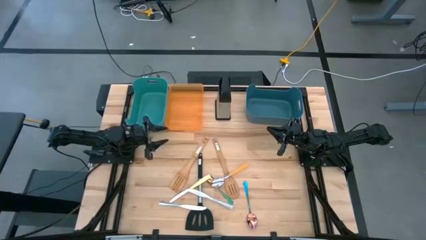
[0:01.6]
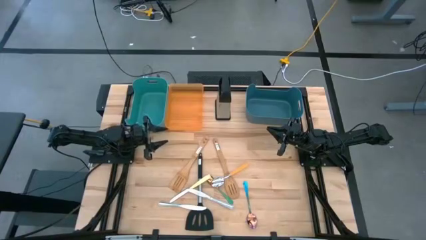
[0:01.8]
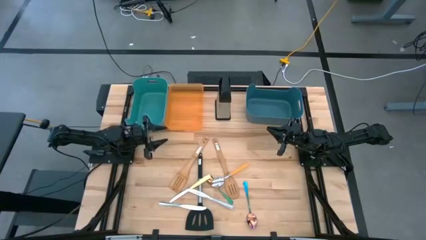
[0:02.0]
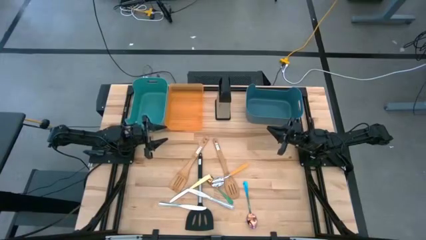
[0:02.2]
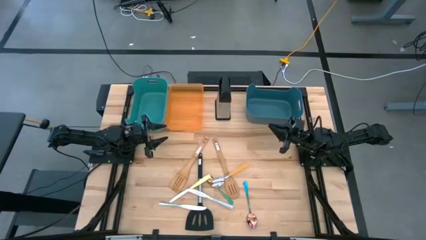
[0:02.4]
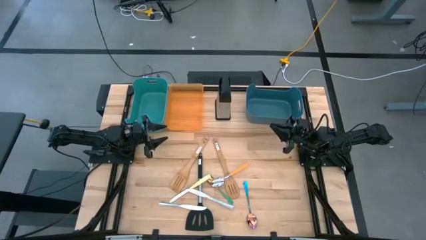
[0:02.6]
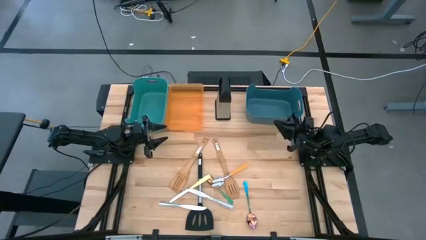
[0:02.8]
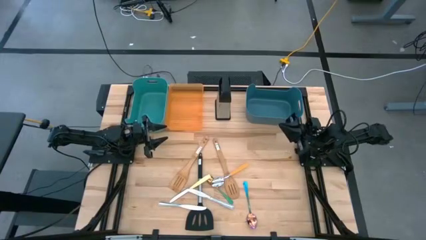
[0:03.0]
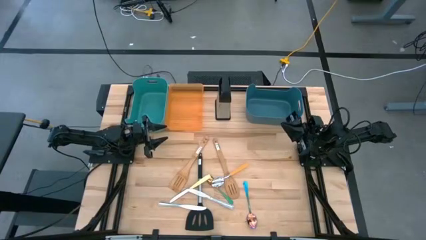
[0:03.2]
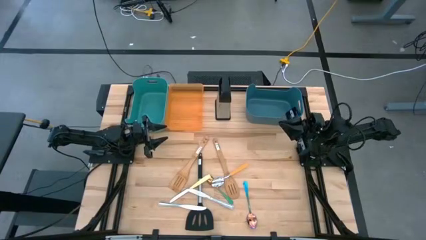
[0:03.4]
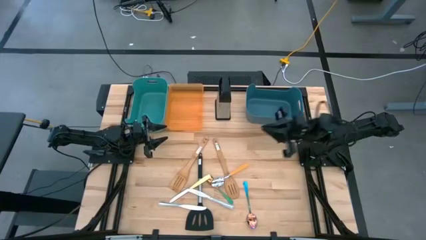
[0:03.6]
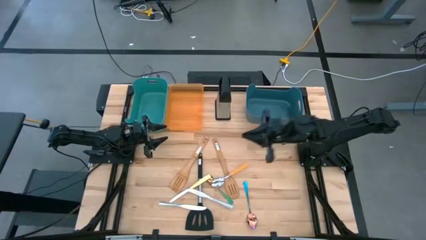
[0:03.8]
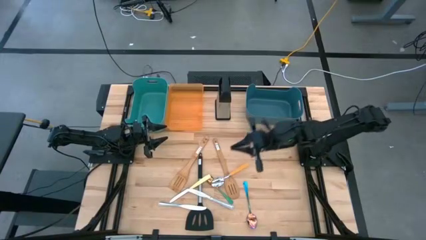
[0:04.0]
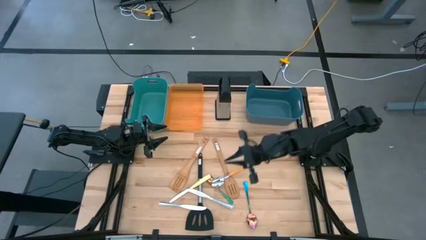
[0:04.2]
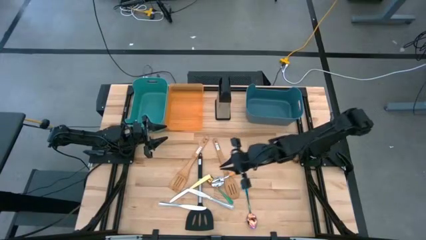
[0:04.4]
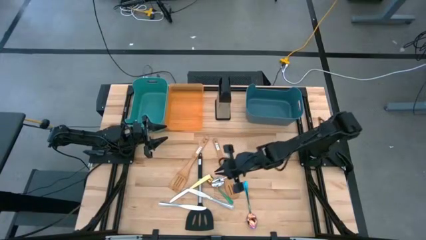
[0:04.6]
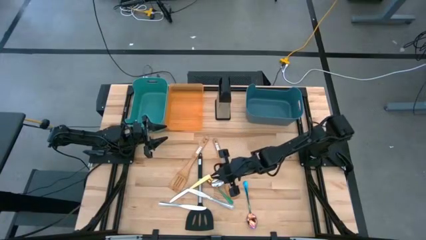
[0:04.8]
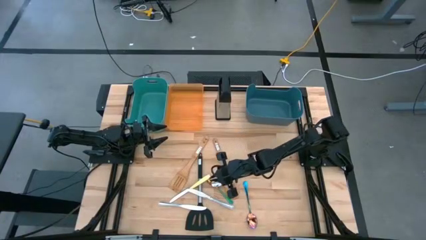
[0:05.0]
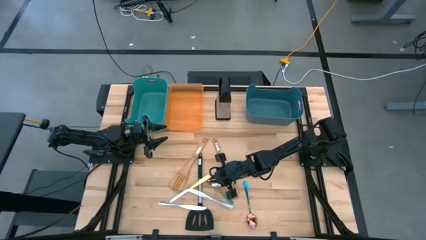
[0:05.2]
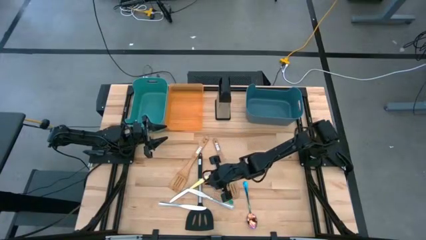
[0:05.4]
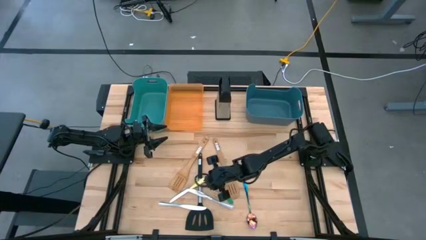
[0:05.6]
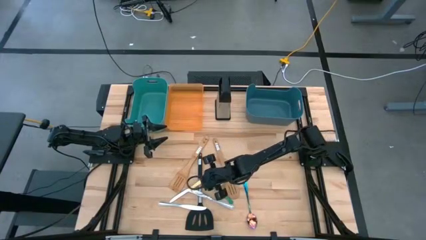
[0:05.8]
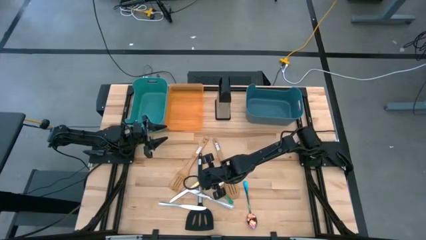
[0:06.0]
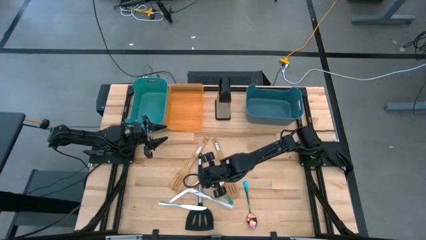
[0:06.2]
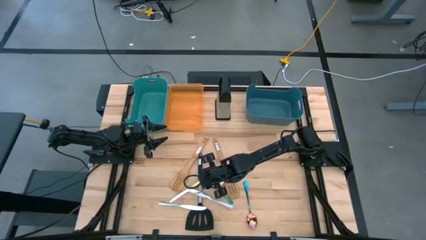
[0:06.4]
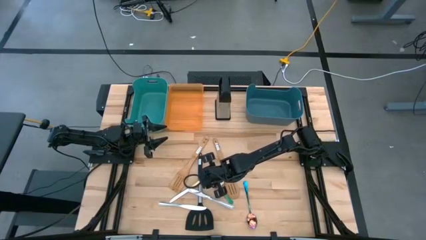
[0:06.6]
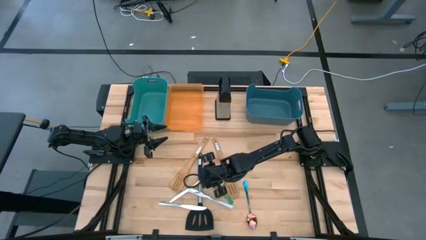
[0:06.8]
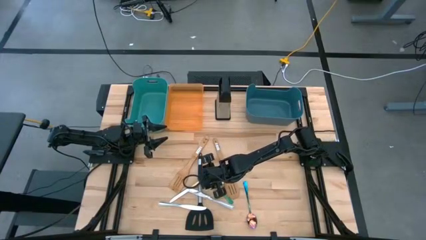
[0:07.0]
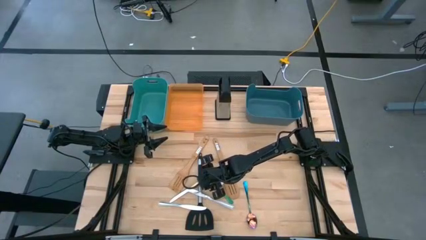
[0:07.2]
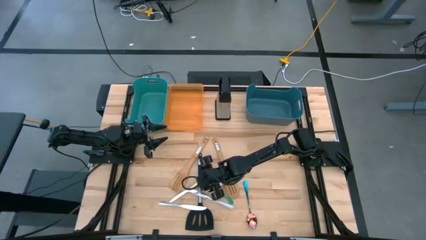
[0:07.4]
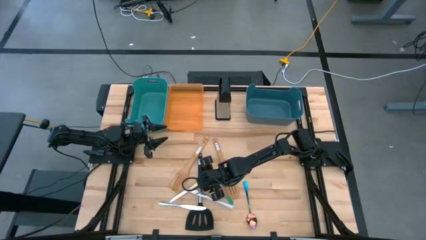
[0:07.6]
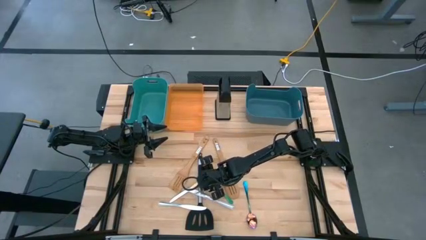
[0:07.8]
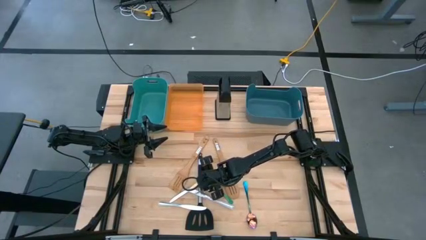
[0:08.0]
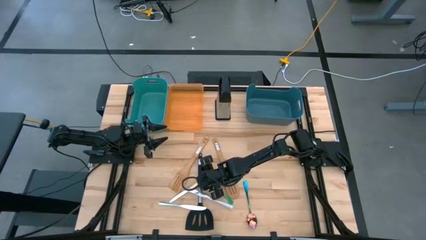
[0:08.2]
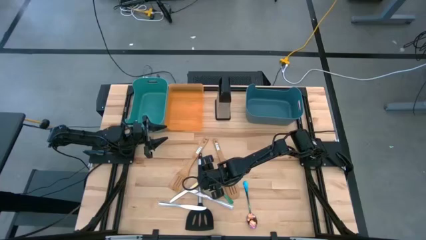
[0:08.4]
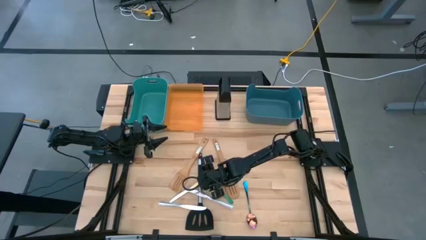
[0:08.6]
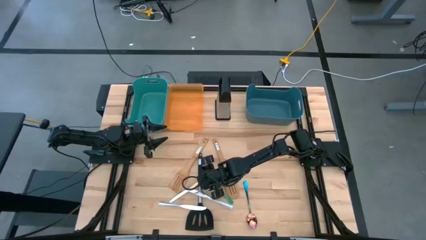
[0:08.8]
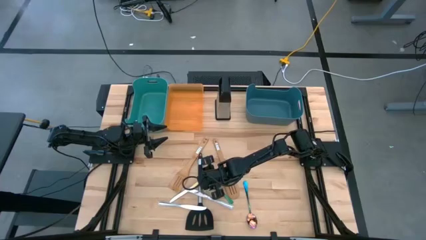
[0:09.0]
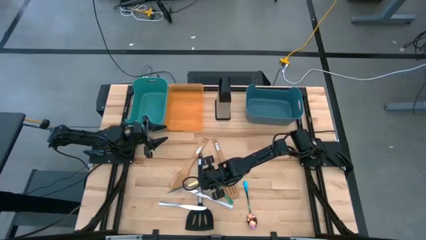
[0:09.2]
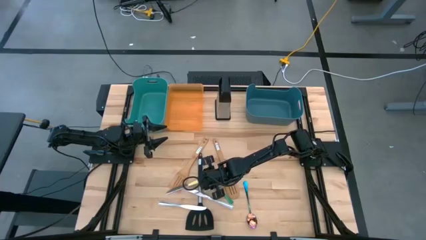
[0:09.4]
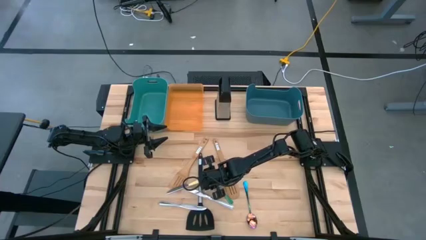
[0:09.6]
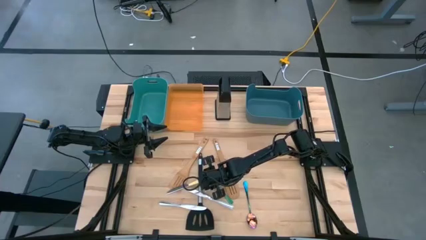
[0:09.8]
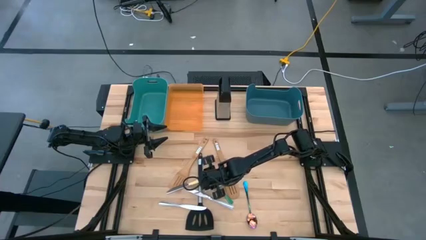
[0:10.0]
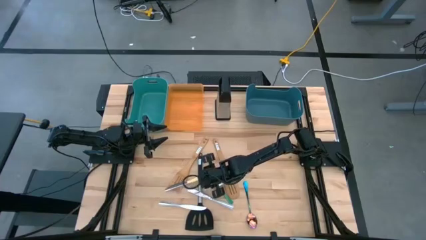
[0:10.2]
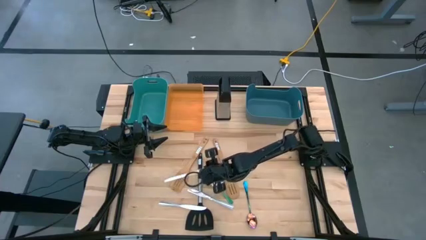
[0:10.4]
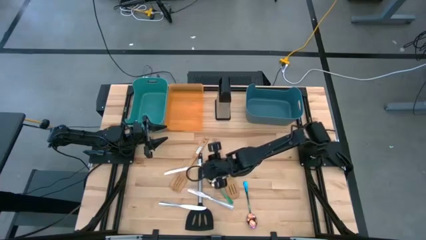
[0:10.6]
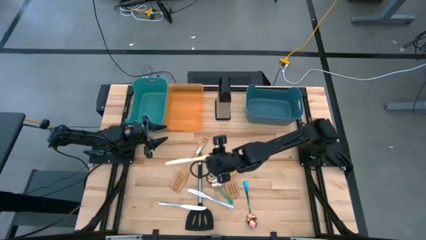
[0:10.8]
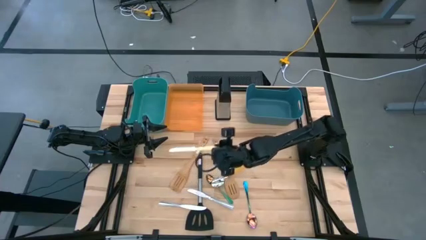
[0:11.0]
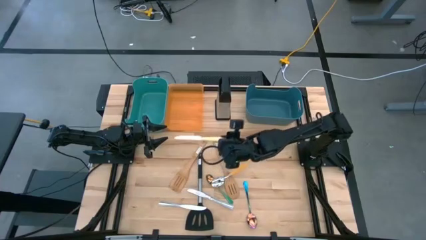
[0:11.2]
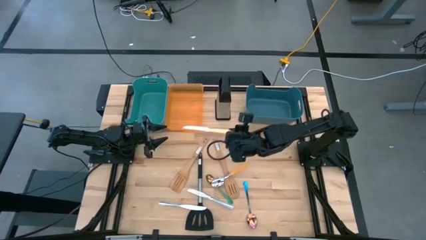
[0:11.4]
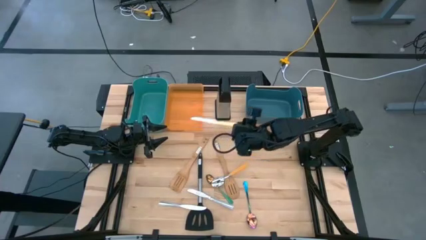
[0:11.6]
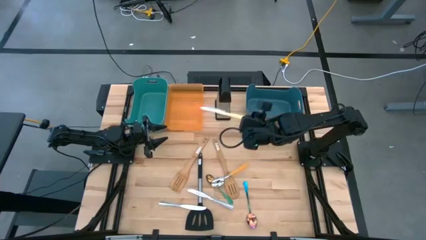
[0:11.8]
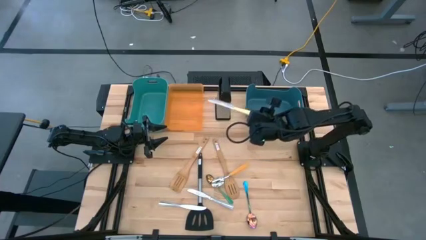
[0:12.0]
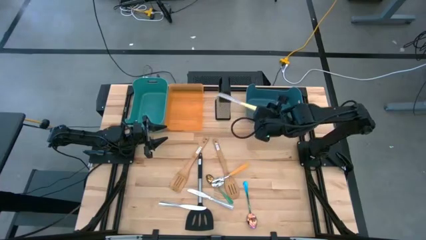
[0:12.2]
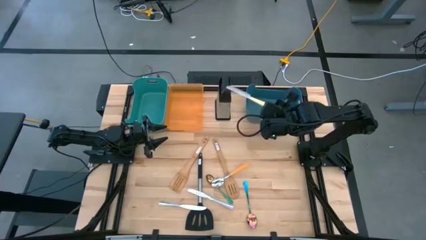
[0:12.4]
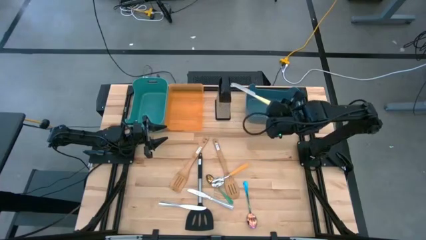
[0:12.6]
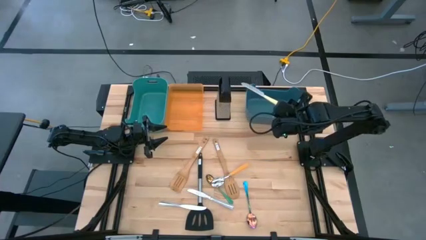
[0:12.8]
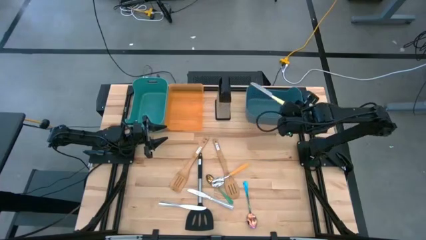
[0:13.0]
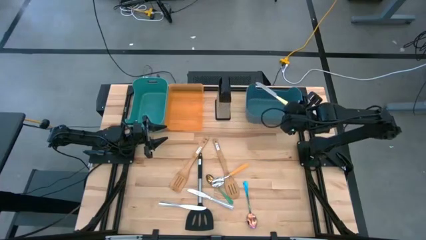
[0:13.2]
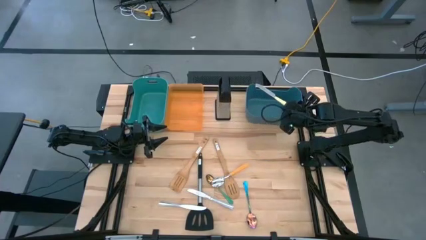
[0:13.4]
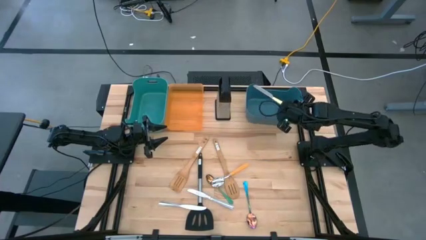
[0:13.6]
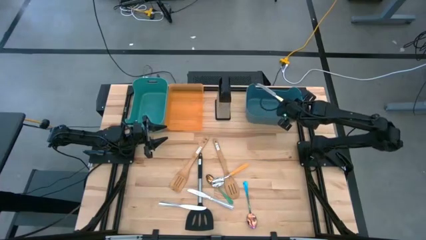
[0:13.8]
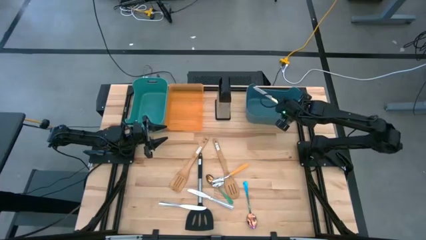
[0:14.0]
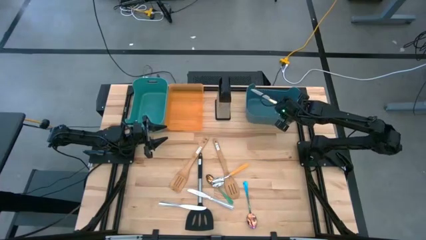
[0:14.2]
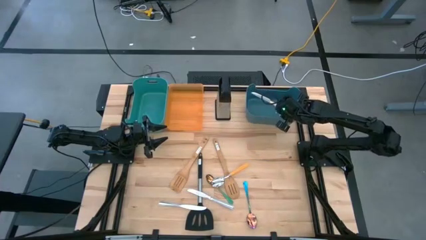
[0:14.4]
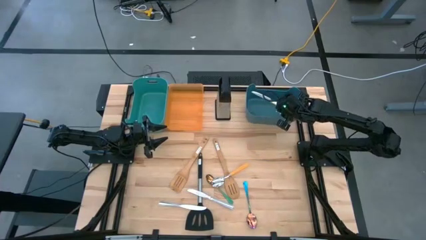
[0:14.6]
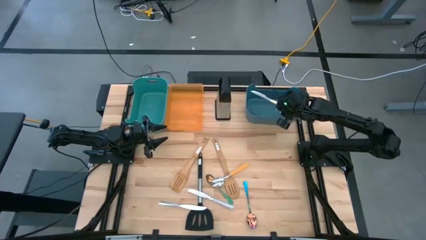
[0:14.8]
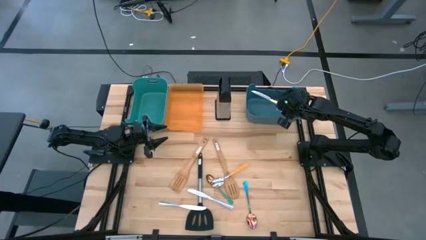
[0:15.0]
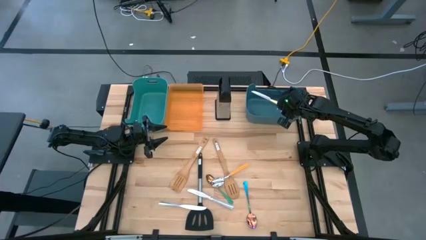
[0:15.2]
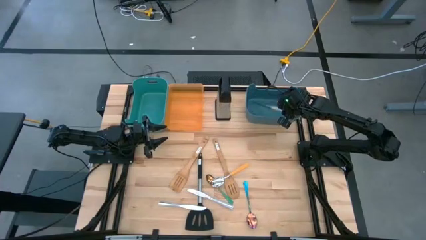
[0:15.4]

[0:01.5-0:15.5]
Task: Pick & Place Kitchen Items
Put the yellow table knife into the blue bin
